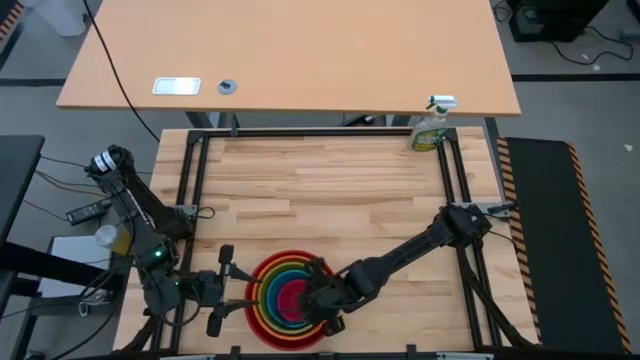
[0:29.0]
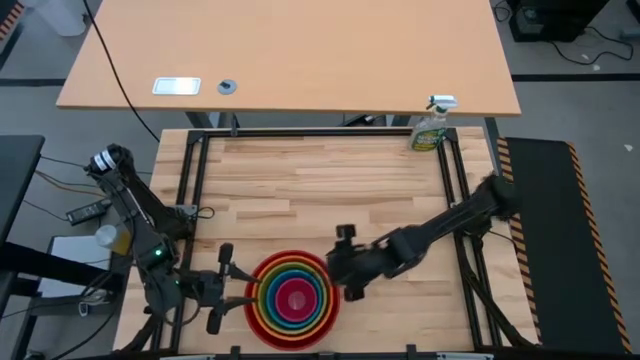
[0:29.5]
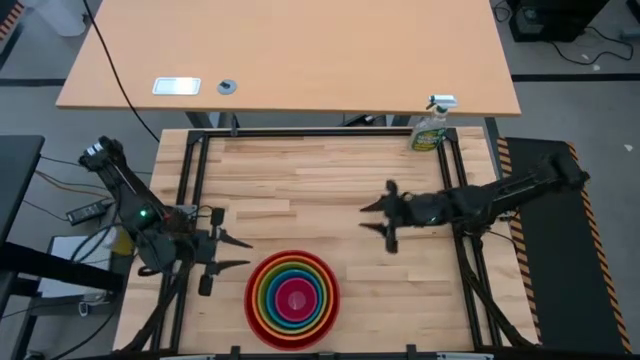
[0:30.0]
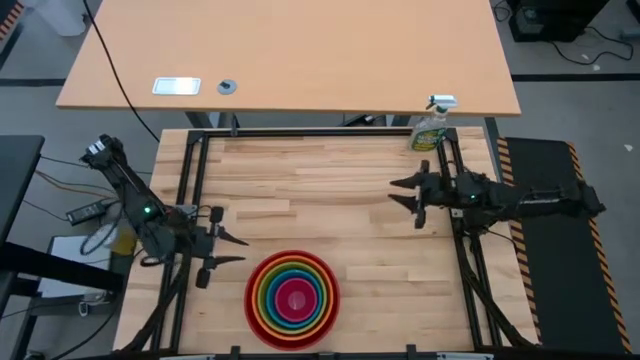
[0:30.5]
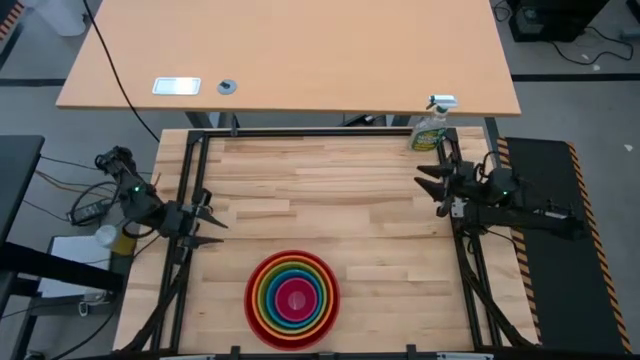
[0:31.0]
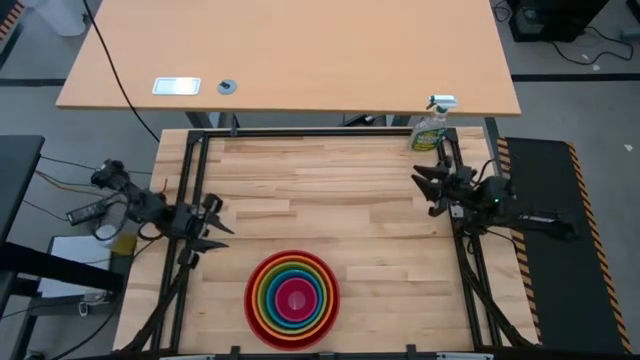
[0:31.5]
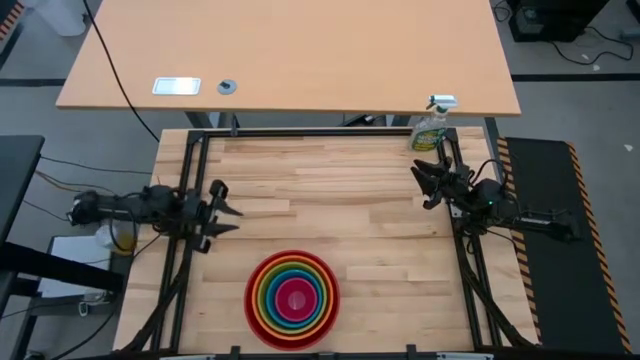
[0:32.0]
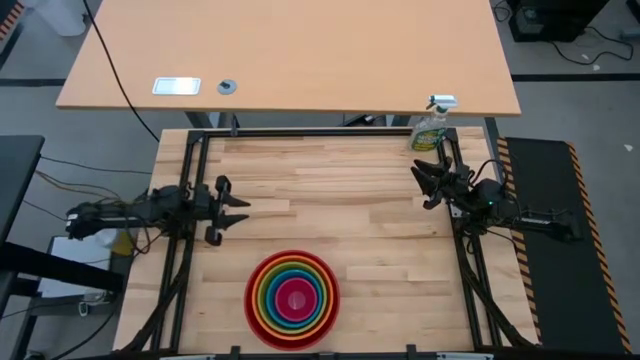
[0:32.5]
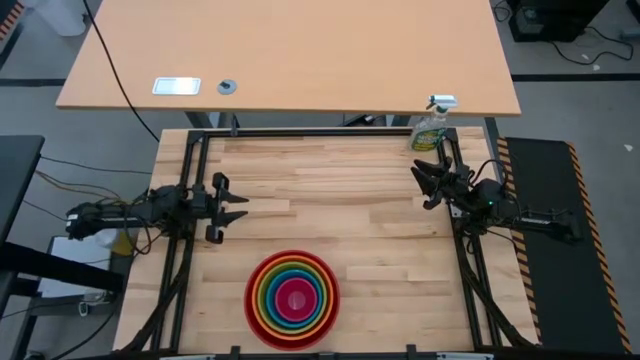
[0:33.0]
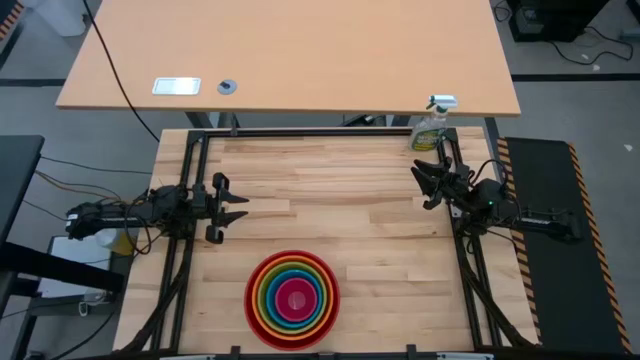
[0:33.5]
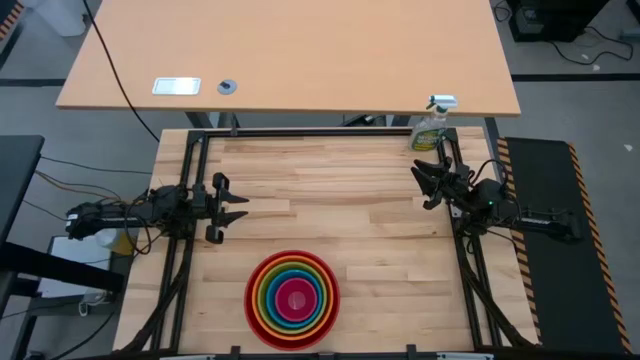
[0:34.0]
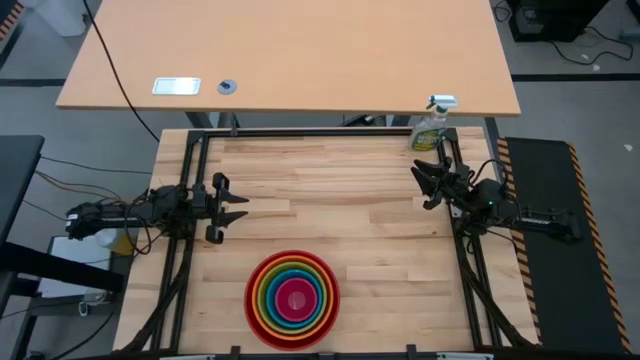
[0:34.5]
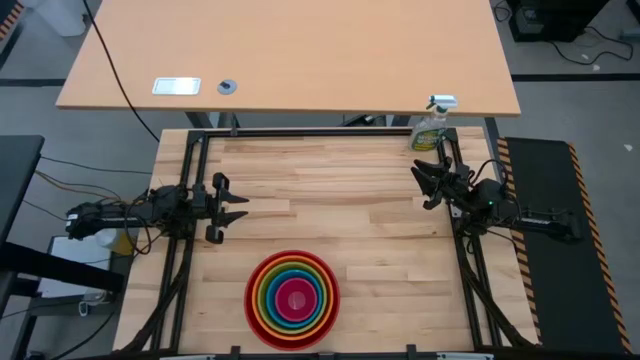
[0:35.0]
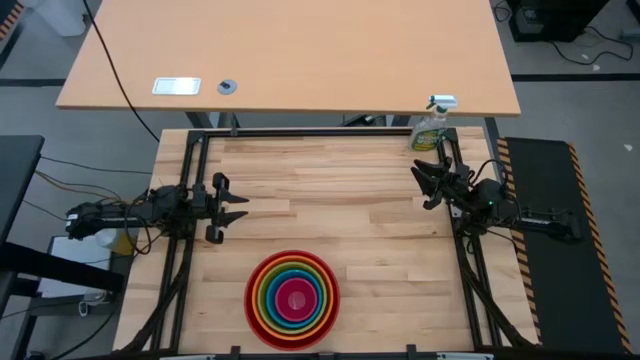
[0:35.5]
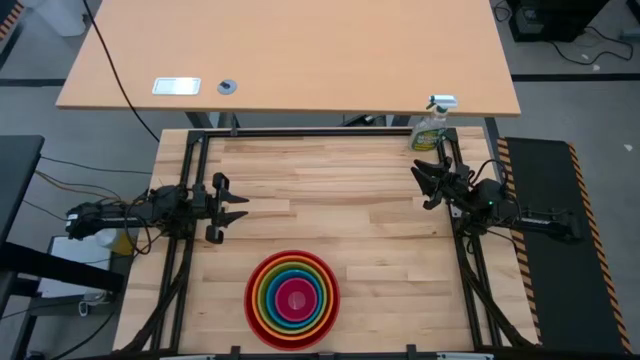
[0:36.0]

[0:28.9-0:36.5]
Return to Home Position

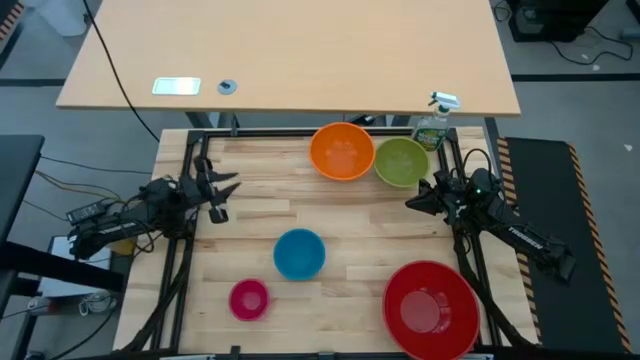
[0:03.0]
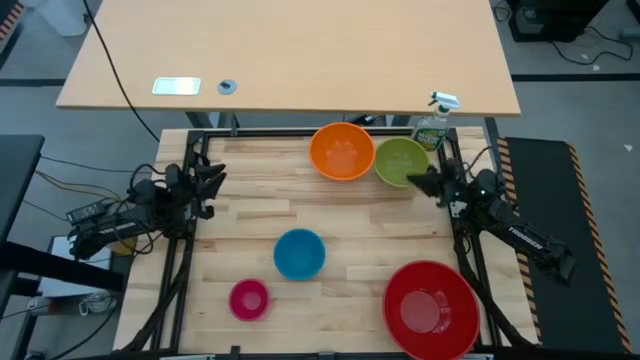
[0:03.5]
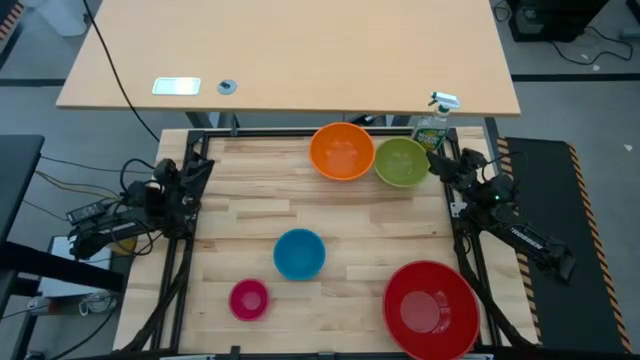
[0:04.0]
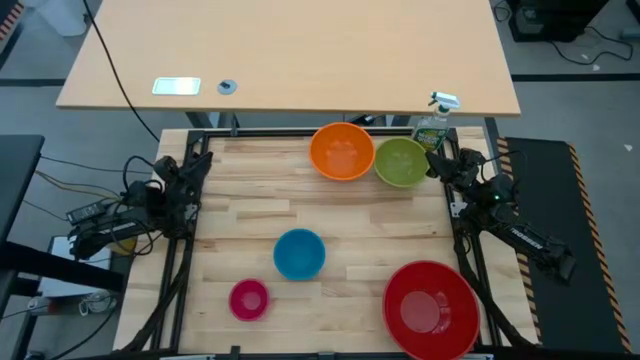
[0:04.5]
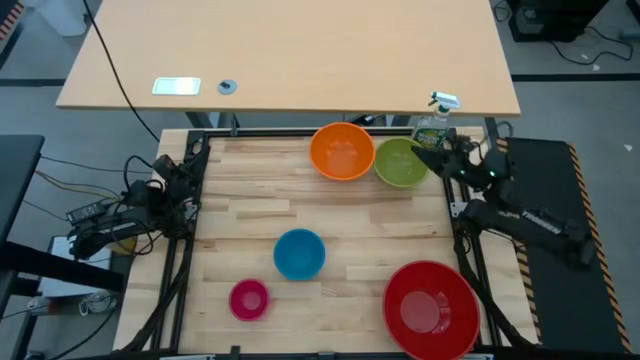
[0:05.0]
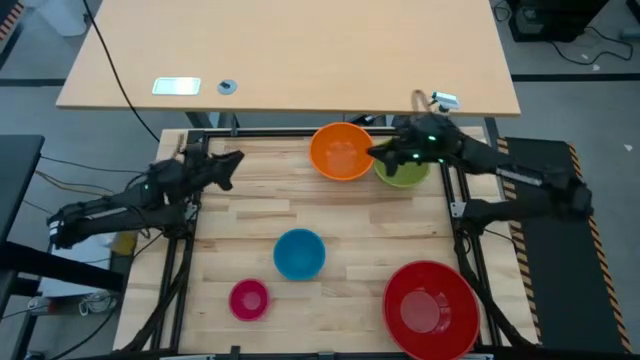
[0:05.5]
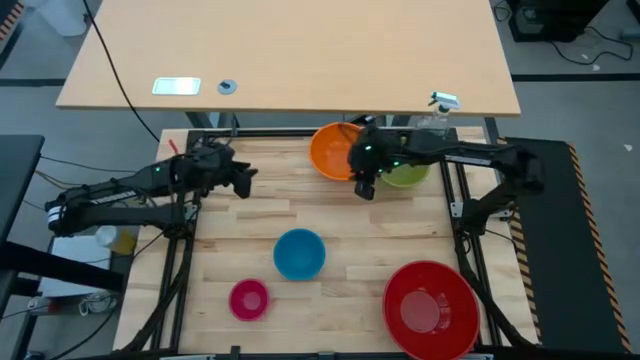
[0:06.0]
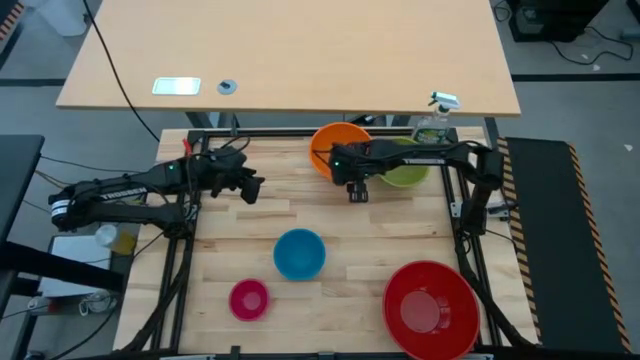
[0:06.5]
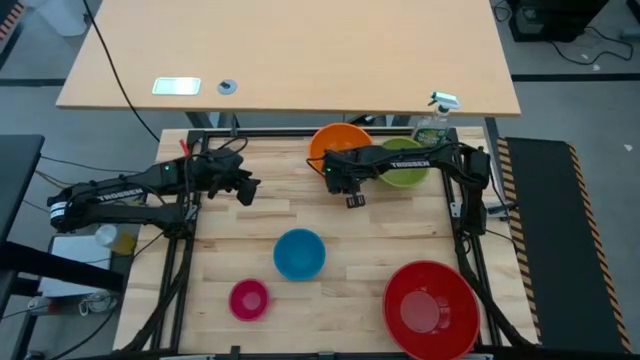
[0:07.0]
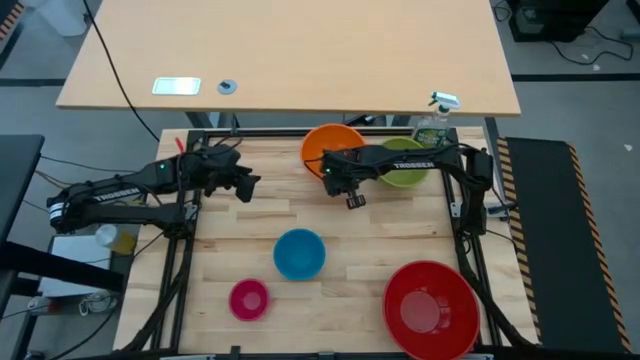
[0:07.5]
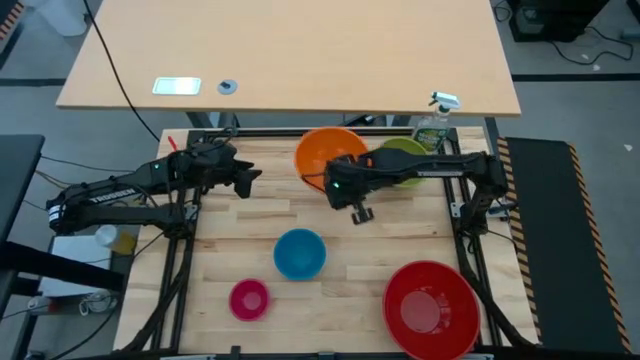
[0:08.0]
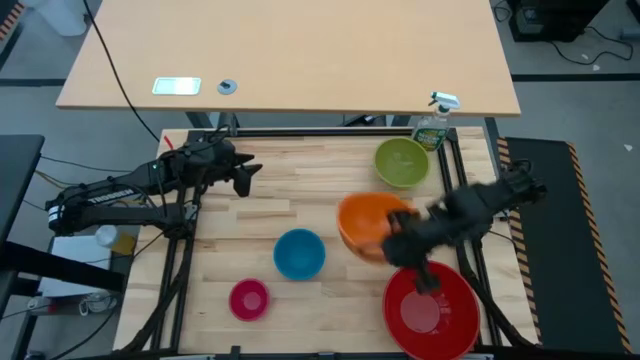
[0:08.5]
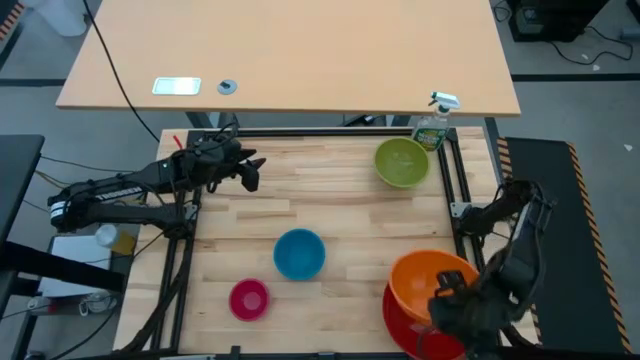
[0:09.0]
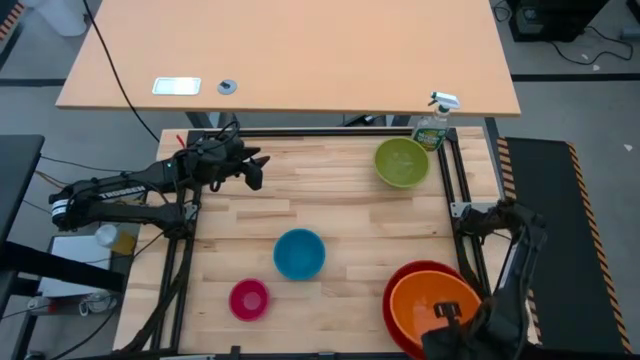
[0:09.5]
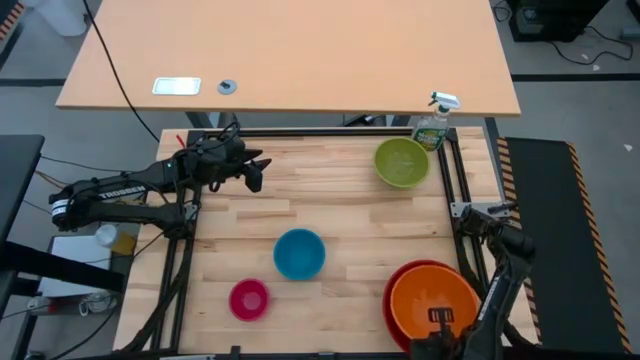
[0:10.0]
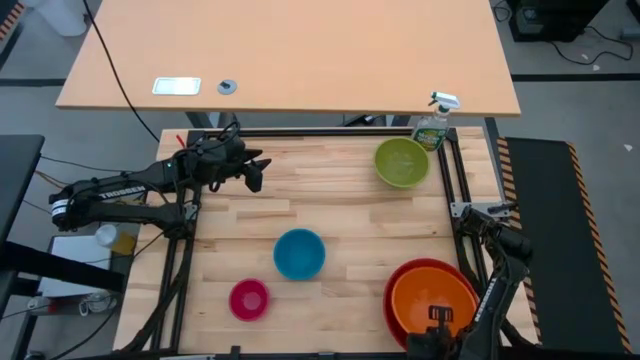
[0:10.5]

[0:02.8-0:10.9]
Stack the orange bowl on the red bowl

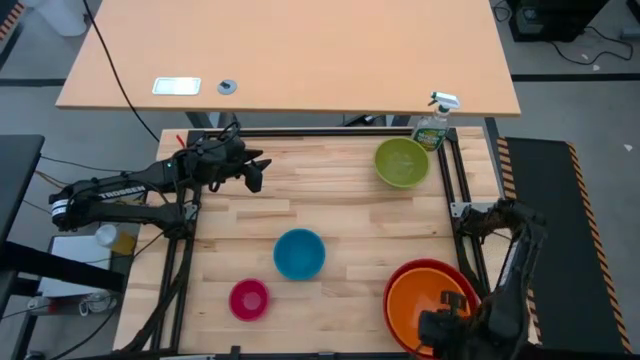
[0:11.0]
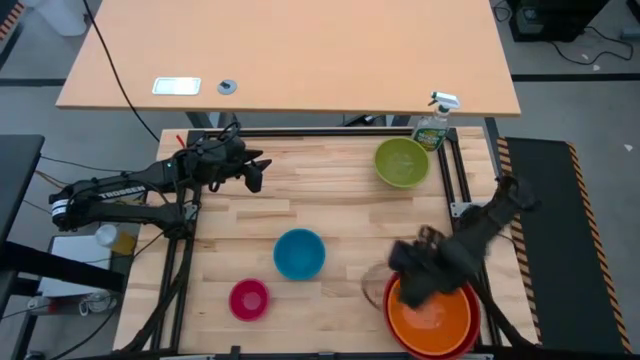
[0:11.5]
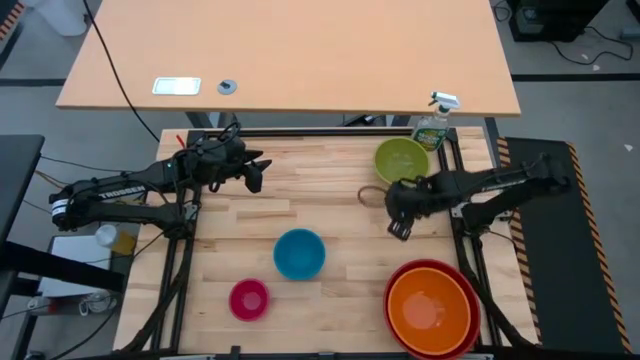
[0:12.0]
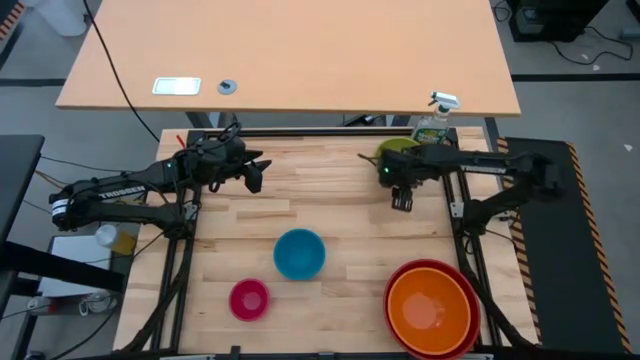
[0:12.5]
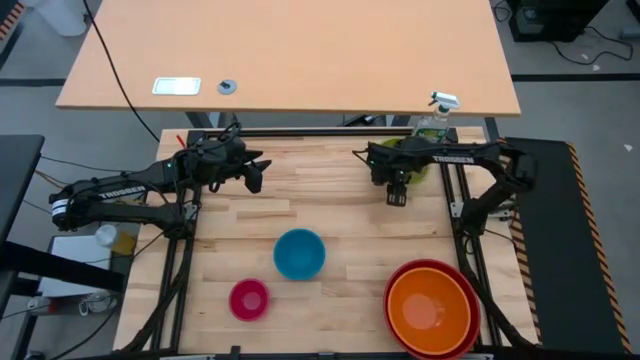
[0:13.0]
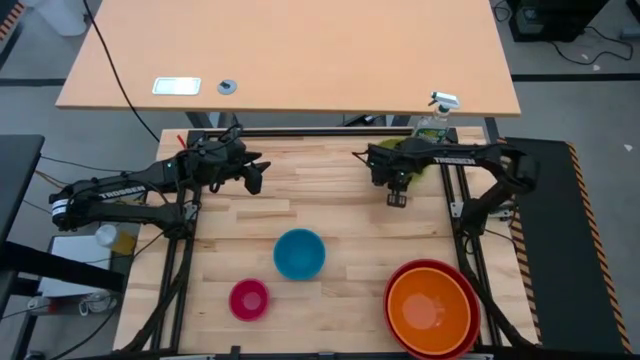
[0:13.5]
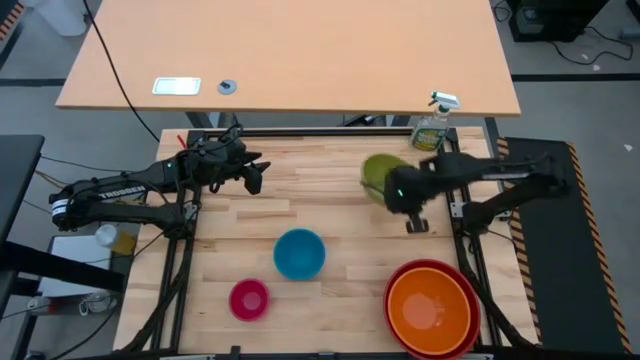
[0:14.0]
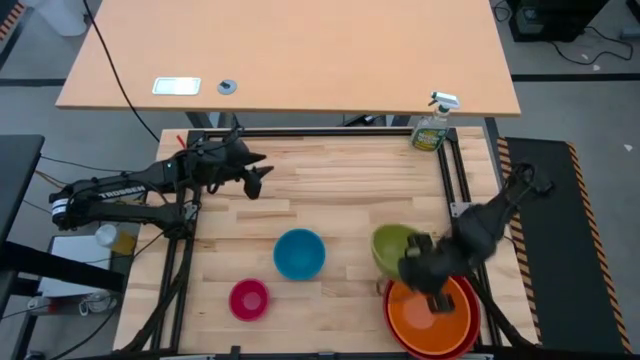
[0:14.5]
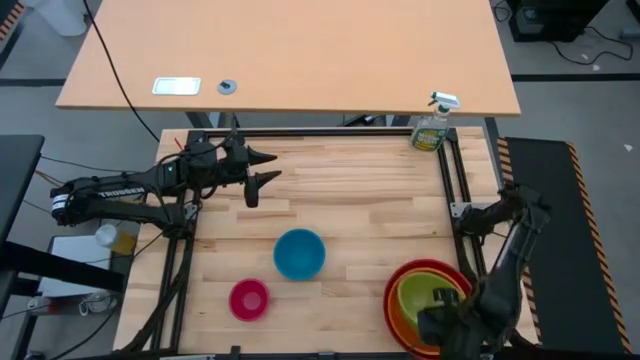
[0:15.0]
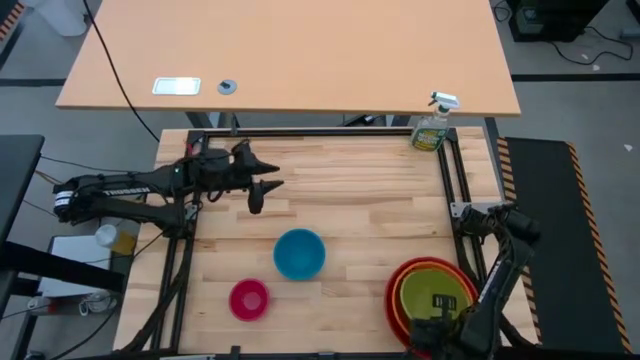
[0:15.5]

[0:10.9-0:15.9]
Stack the green bowl on the orange bowl
